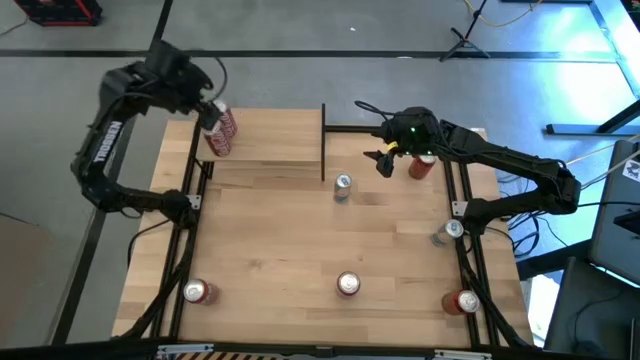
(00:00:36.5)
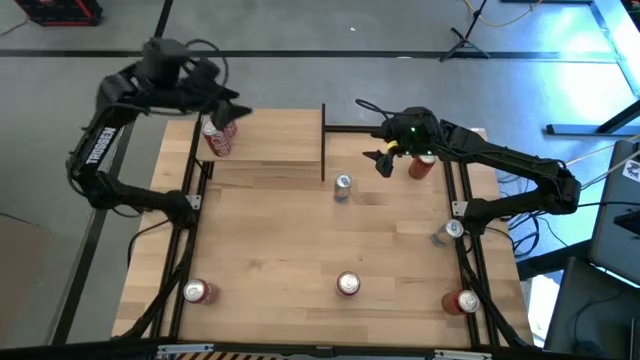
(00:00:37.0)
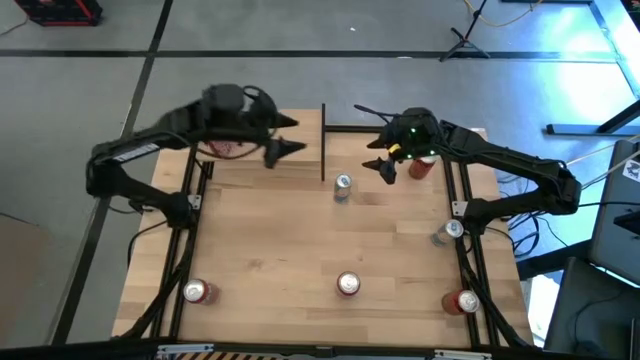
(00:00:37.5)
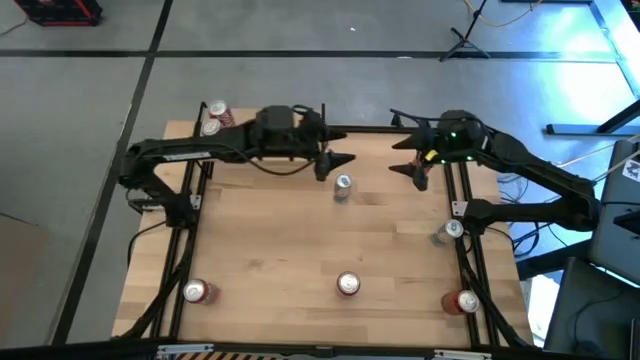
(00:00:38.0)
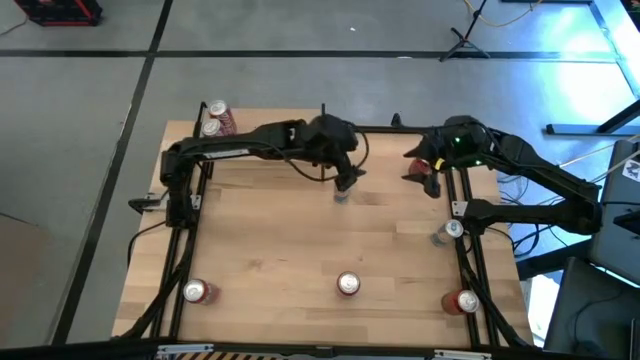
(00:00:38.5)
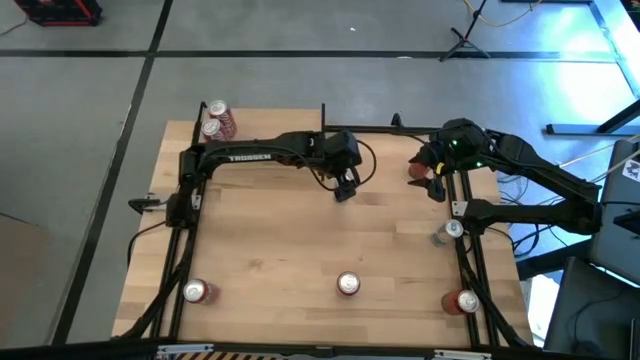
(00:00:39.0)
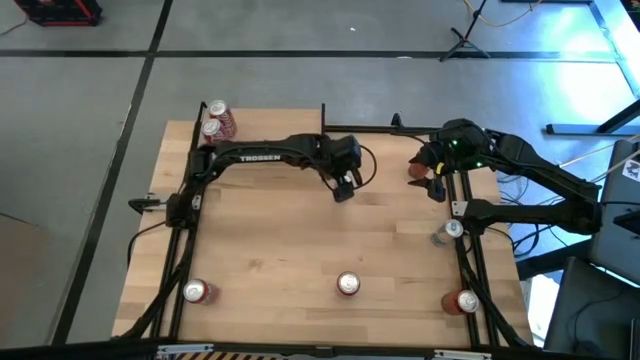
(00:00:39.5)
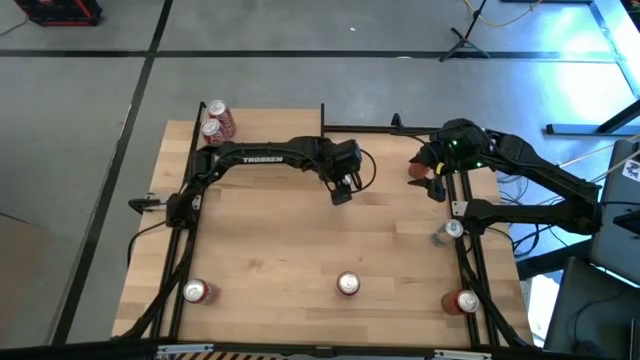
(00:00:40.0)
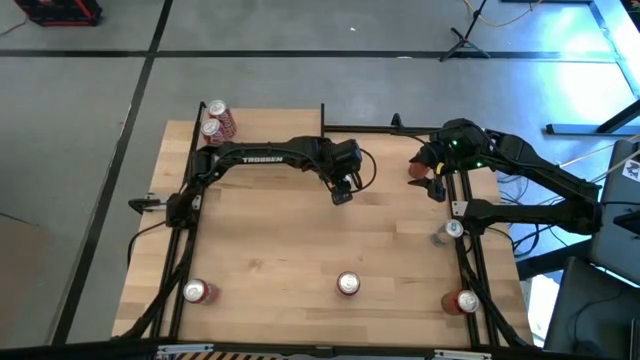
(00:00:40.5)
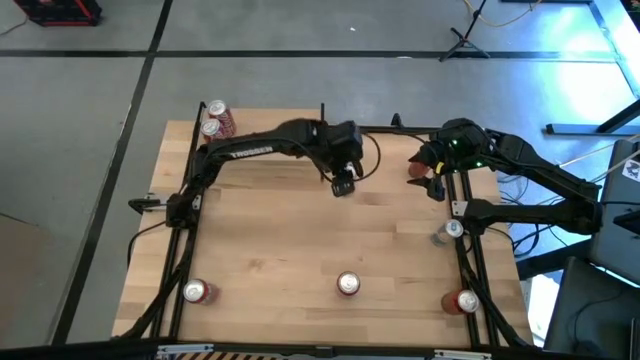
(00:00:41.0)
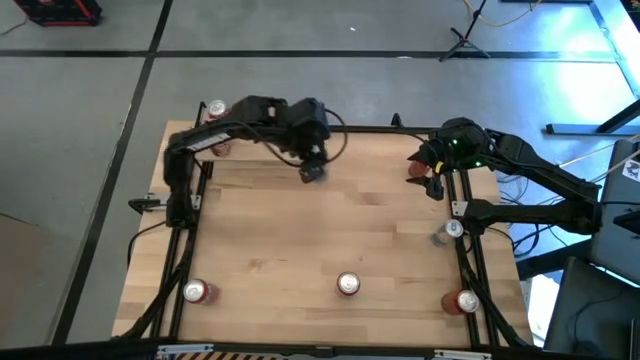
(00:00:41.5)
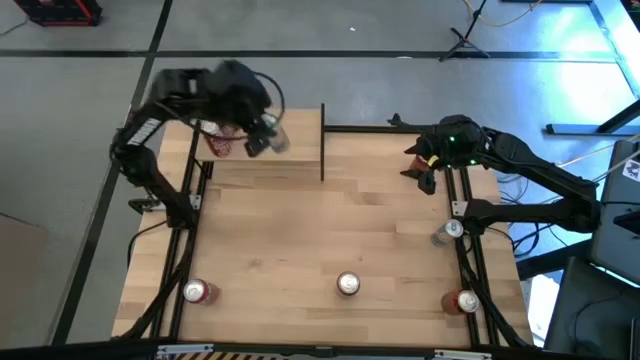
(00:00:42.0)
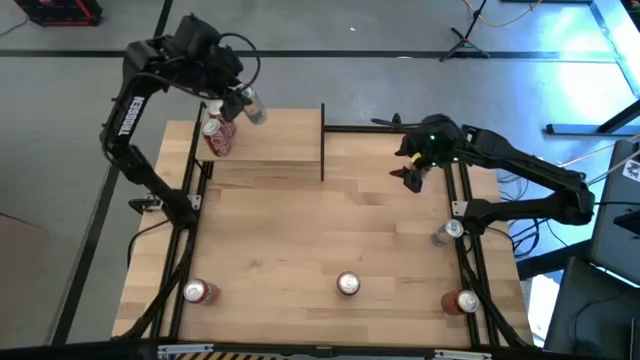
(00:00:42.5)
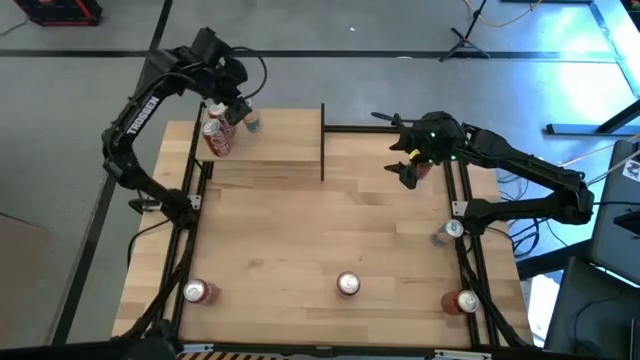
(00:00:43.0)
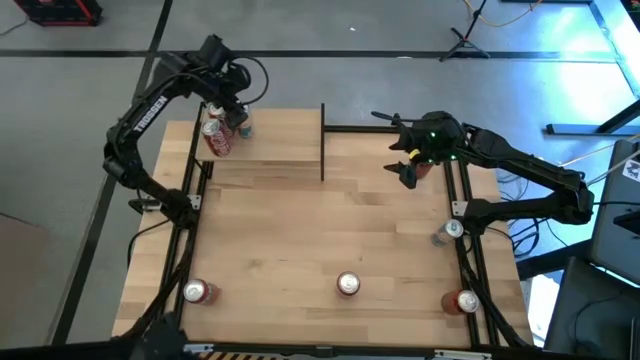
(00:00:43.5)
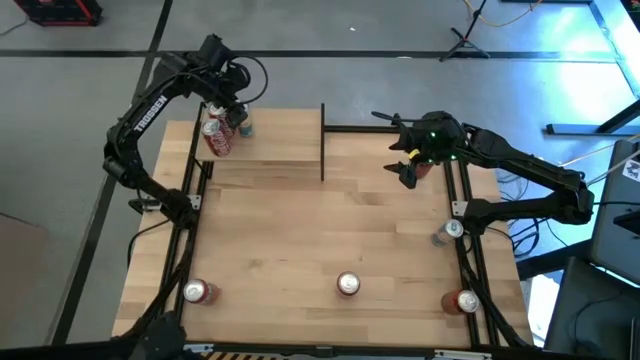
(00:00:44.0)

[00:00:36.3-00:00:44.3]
Task: Place canned beverage on shelf
Put the left blue soda can on the shelf

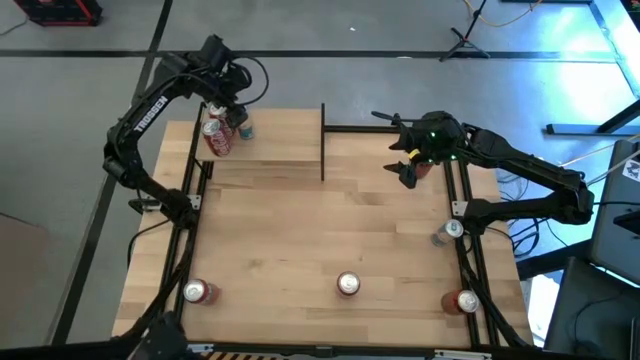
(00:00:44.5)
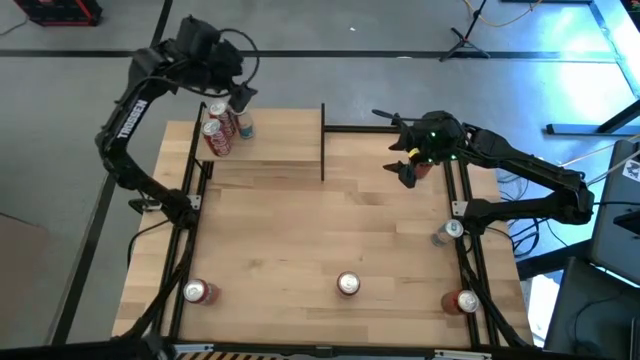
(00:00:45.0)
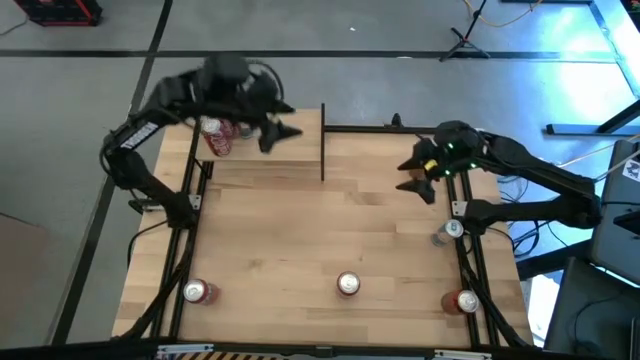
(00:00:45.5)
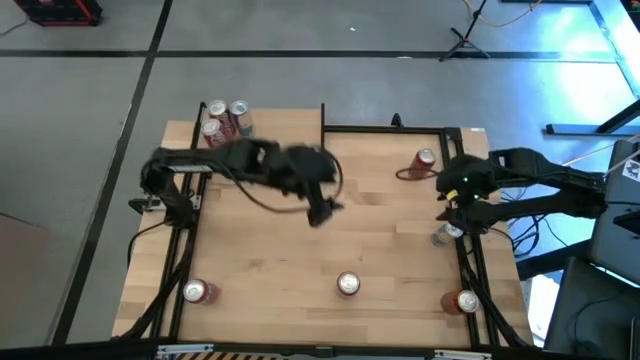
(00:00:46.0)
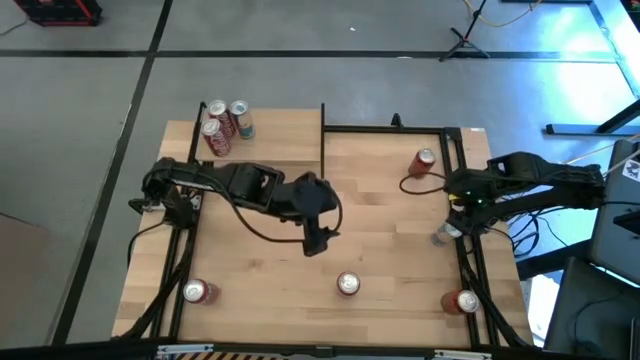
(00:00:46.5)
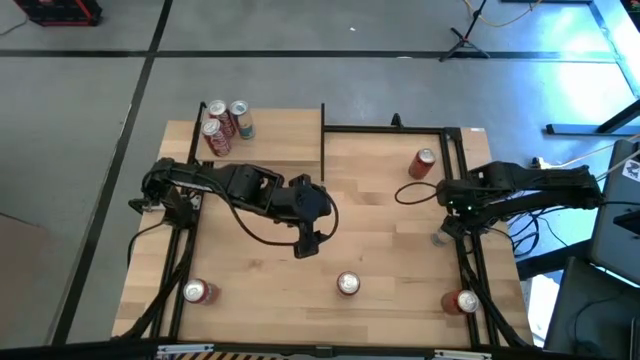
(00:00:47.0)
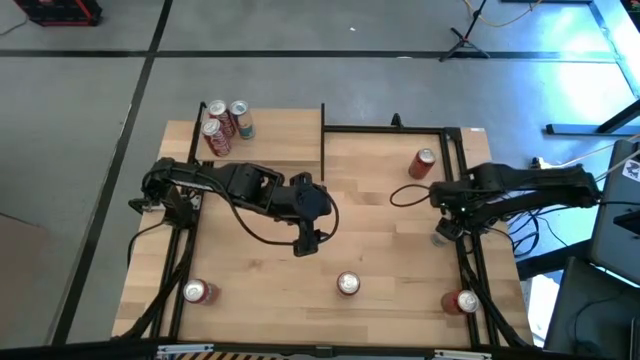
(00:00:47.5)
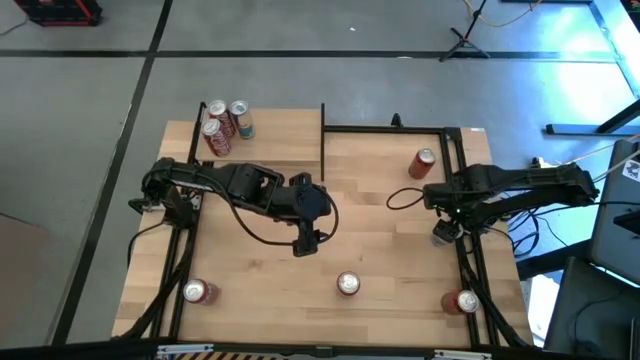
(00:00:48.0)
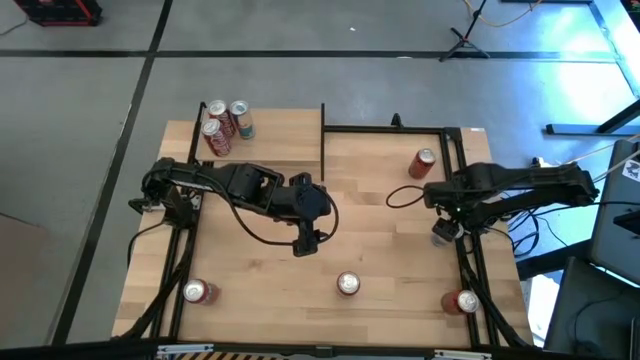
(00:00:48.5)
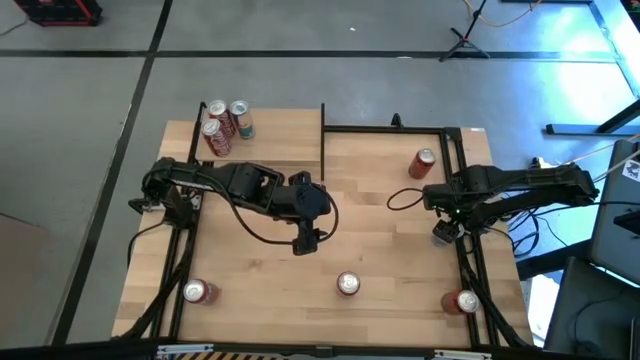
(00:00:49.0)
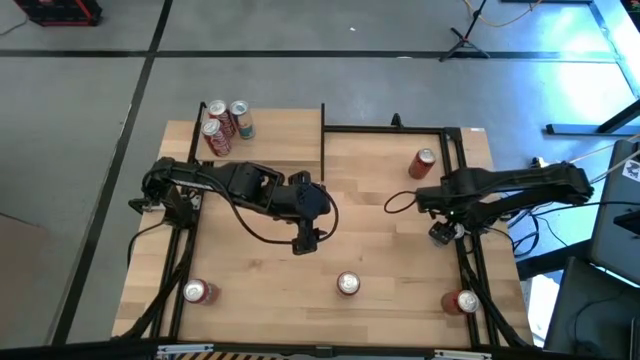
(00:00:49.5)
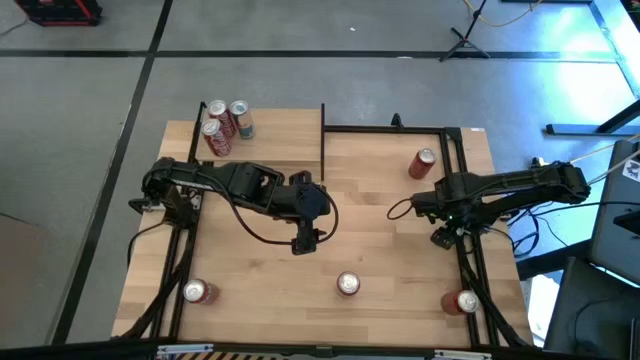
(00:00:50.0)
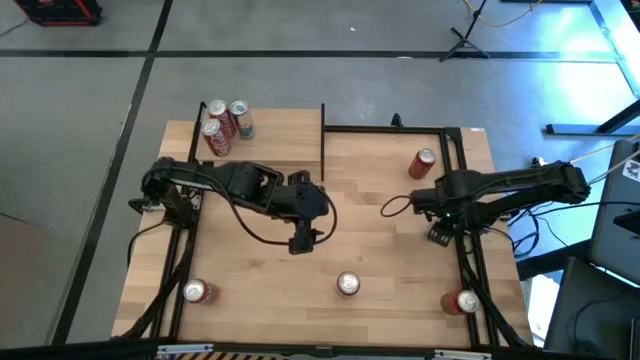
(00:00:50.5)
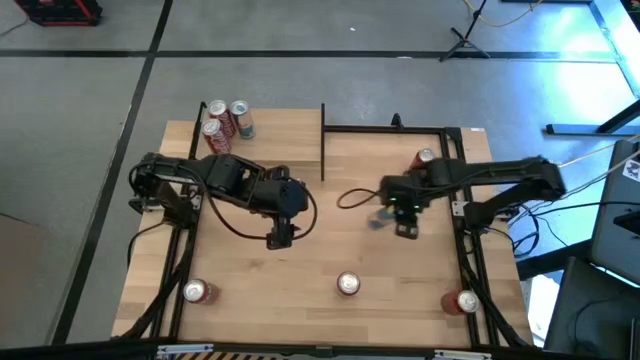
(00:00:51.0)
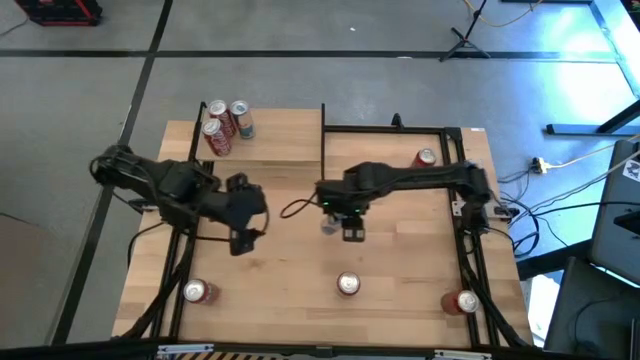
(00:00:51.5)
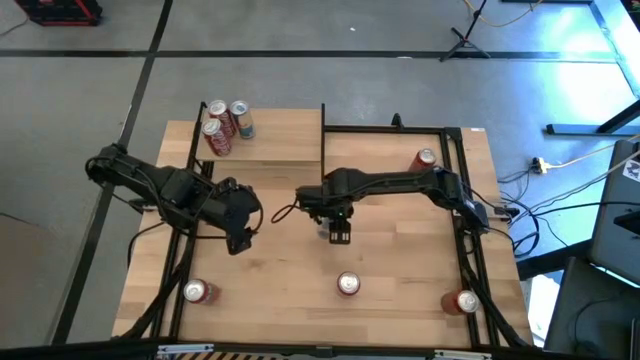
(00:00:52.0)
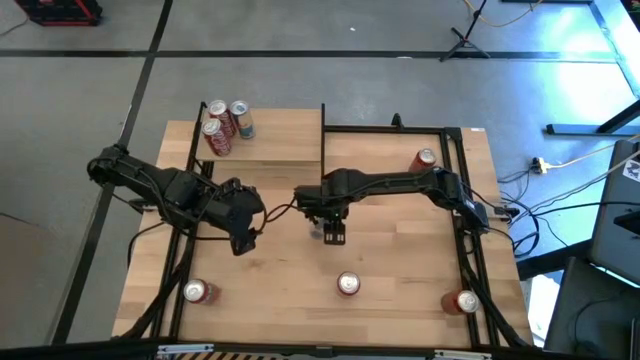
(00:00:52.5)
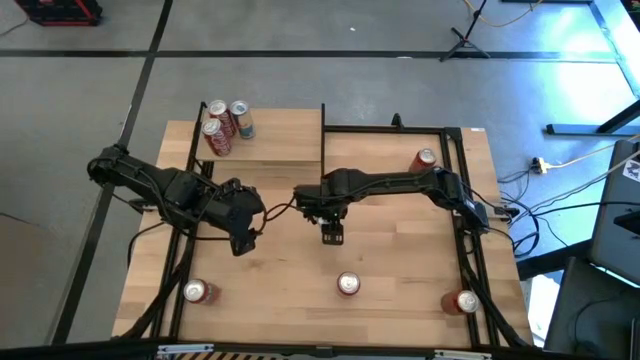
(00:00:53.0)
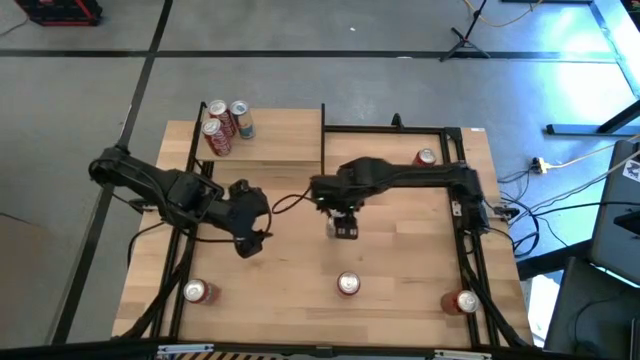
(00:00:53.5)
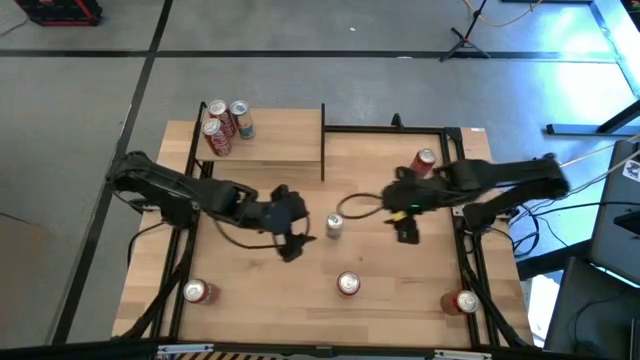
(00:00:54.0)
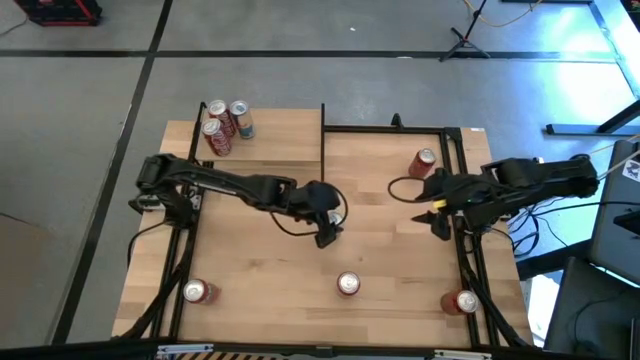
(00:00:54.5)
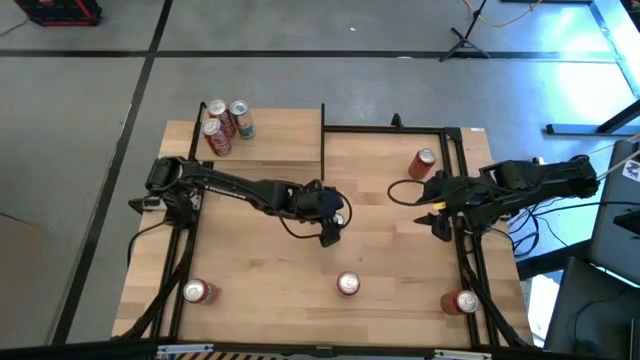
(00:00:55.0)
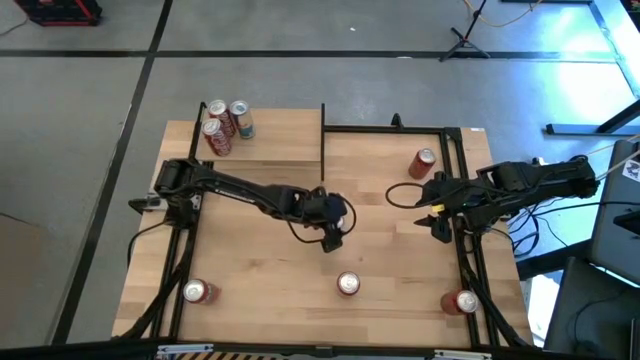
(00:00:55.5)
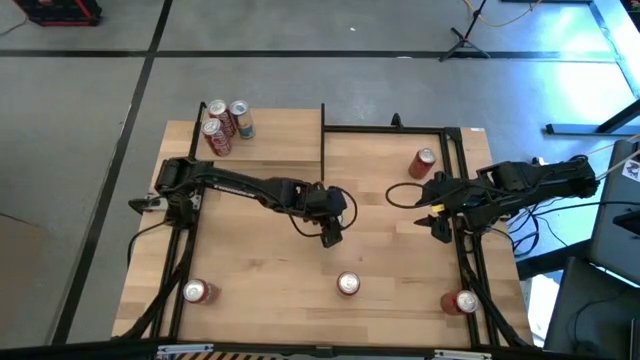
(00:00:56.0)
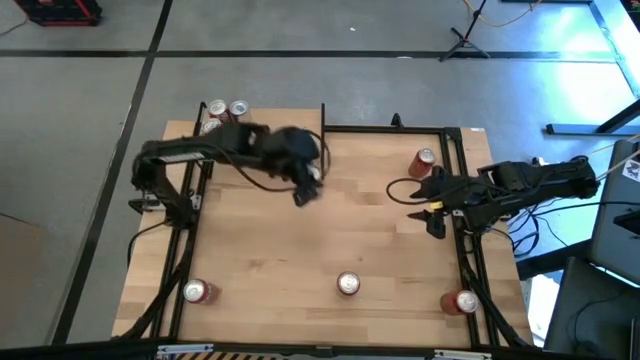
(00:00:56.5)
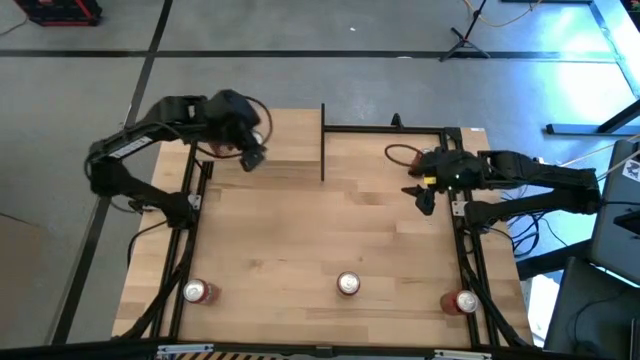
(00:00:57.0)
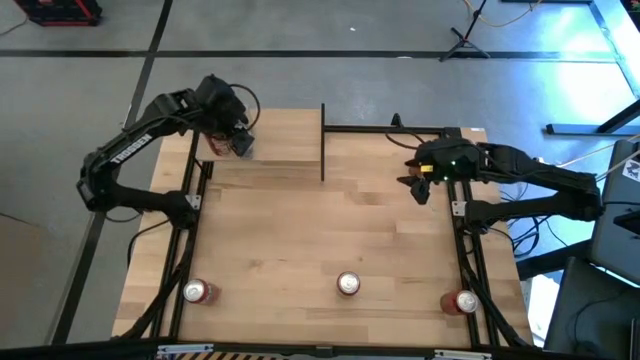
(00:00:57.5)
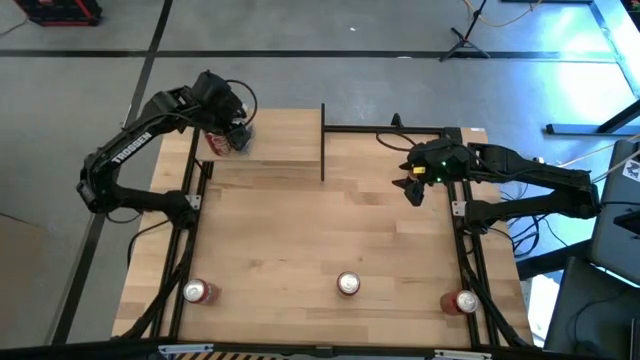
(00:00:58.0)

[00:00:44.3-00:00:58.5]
Put the blue soda can on the shelf aligned with the other blue soda can
